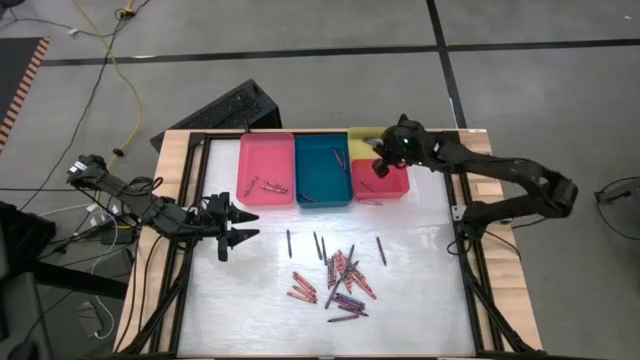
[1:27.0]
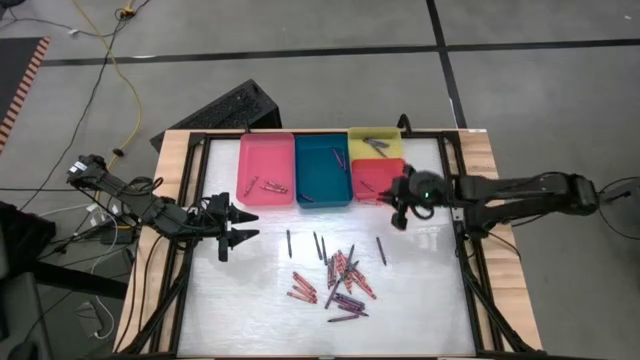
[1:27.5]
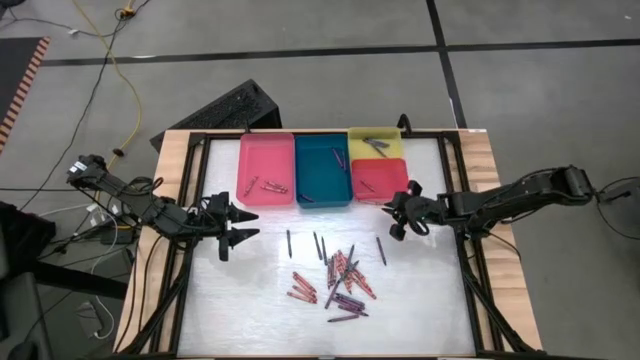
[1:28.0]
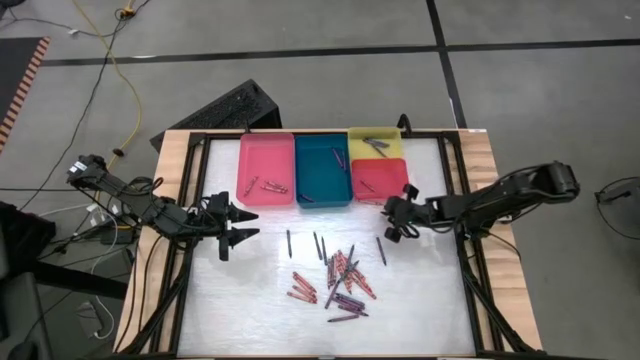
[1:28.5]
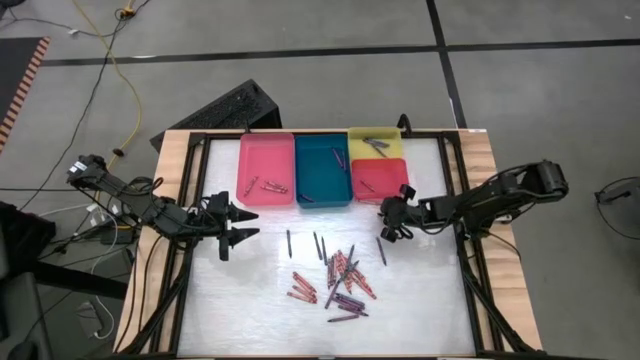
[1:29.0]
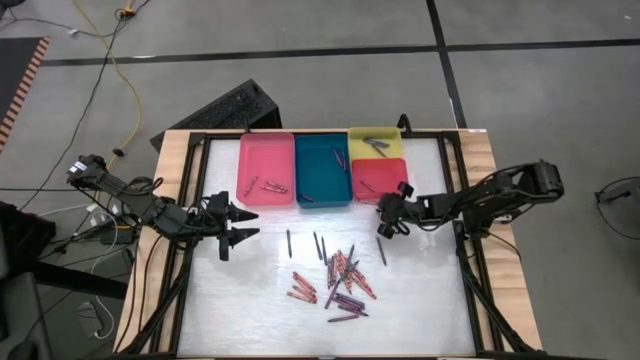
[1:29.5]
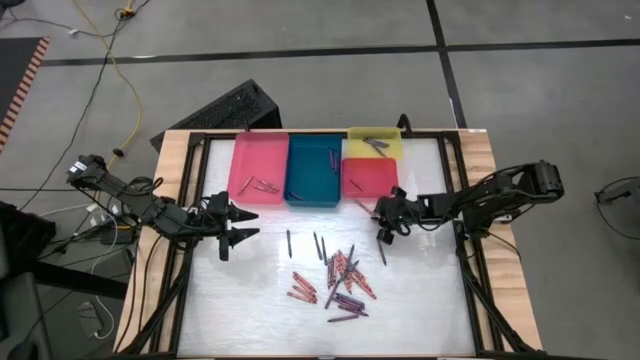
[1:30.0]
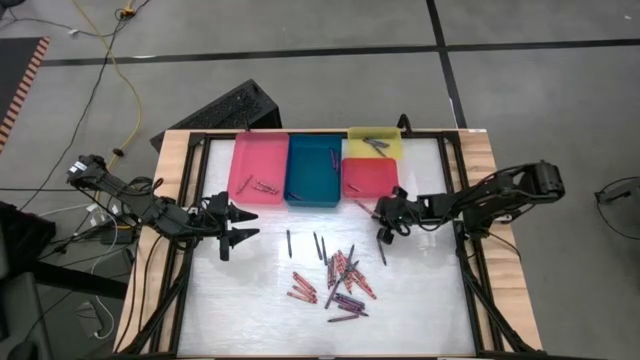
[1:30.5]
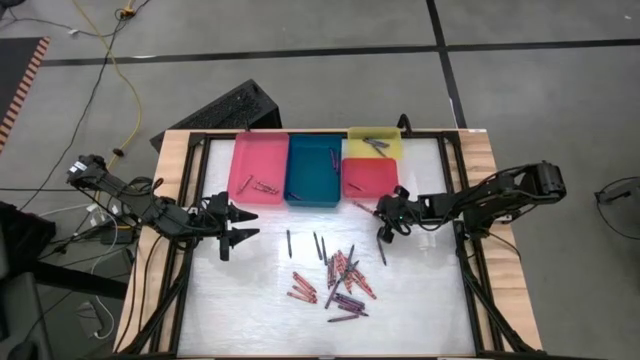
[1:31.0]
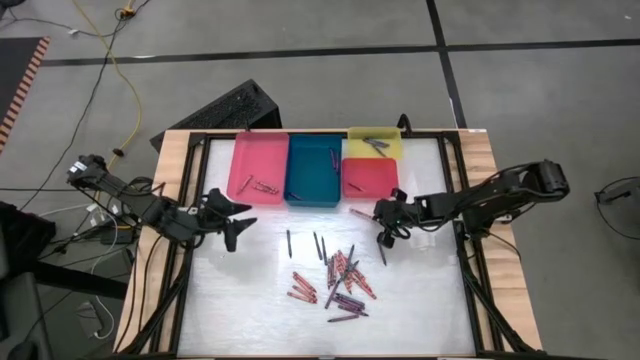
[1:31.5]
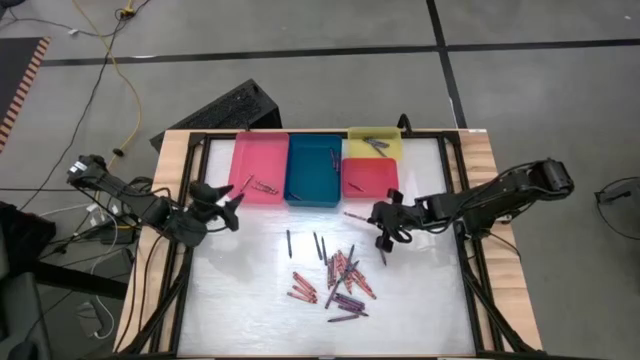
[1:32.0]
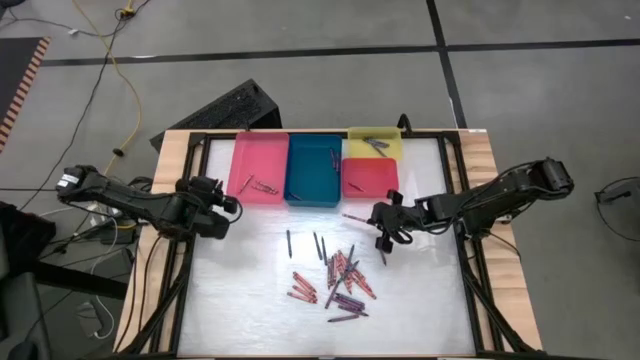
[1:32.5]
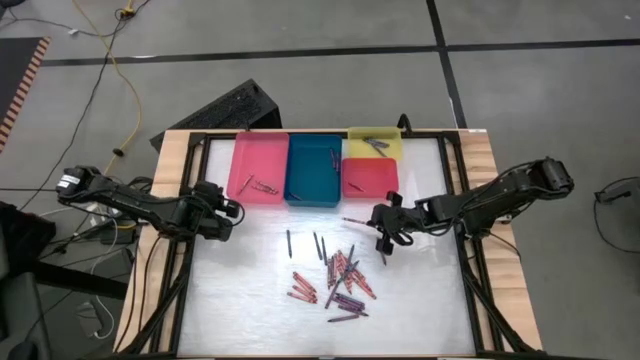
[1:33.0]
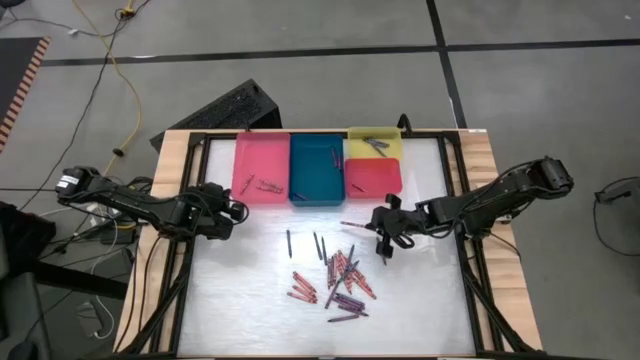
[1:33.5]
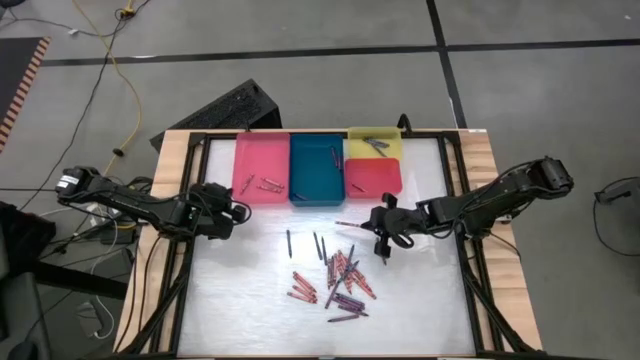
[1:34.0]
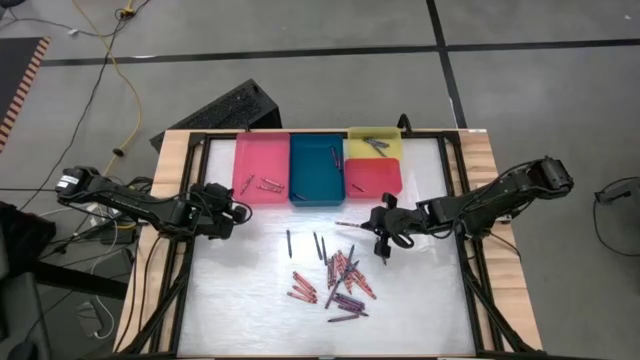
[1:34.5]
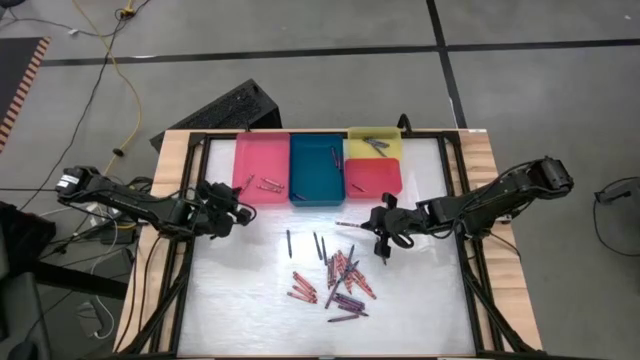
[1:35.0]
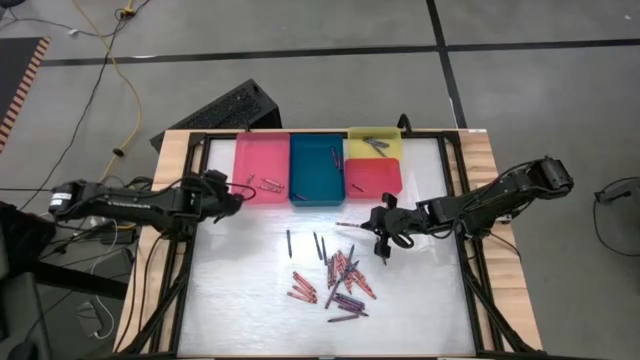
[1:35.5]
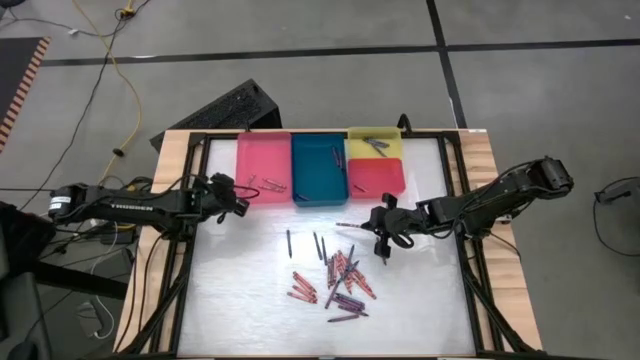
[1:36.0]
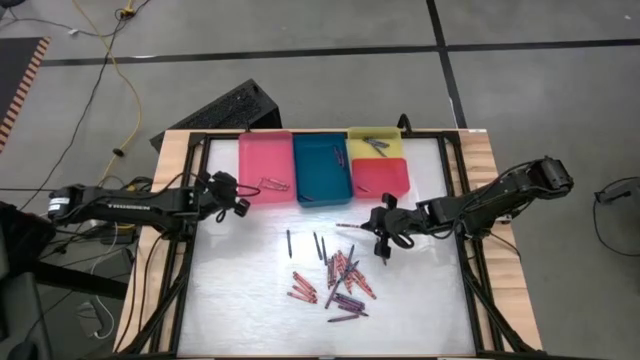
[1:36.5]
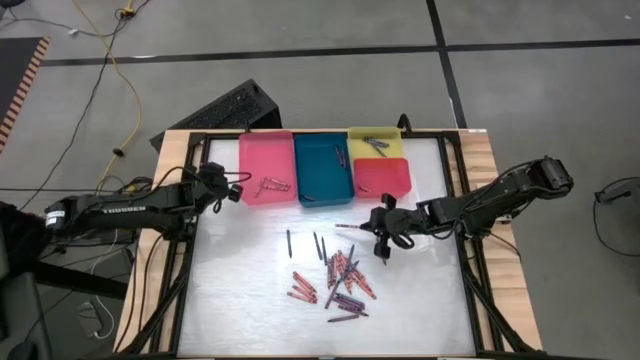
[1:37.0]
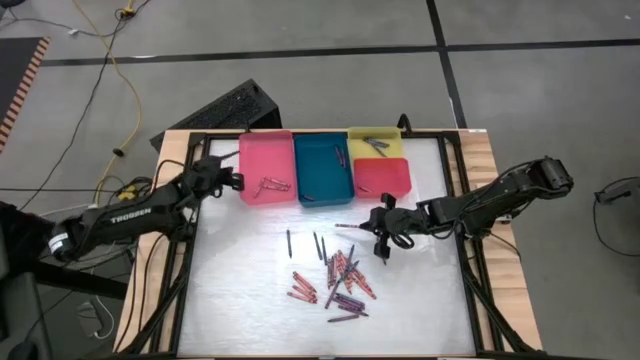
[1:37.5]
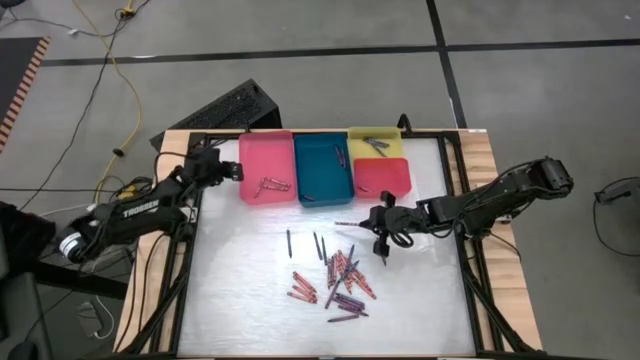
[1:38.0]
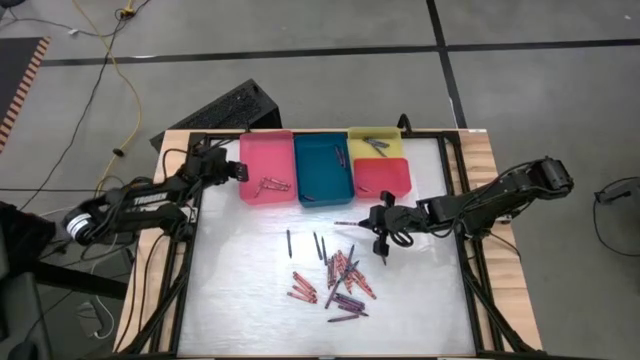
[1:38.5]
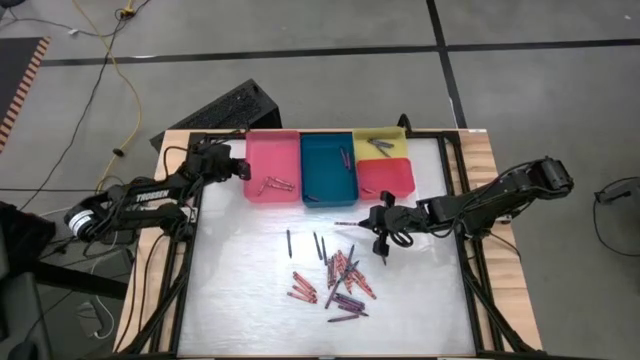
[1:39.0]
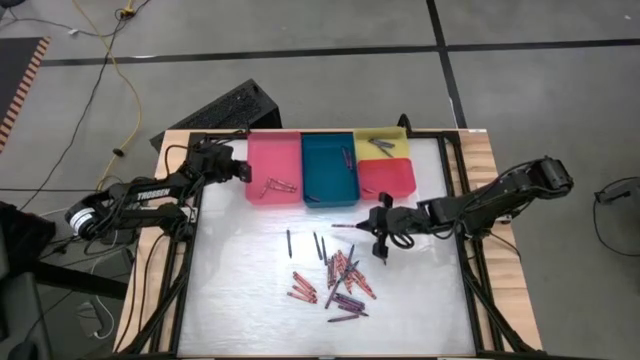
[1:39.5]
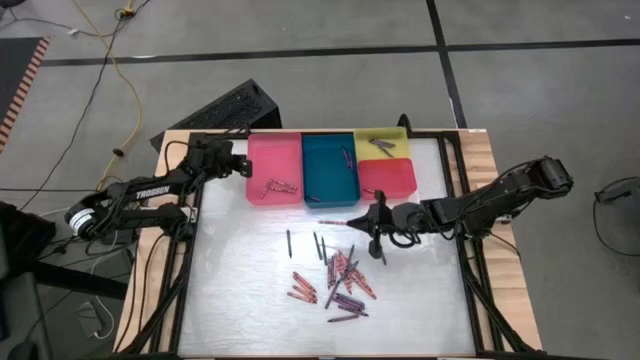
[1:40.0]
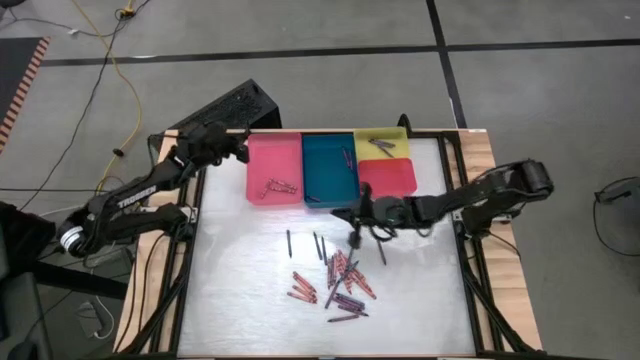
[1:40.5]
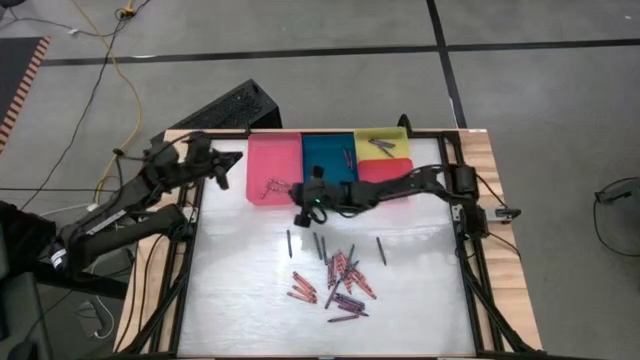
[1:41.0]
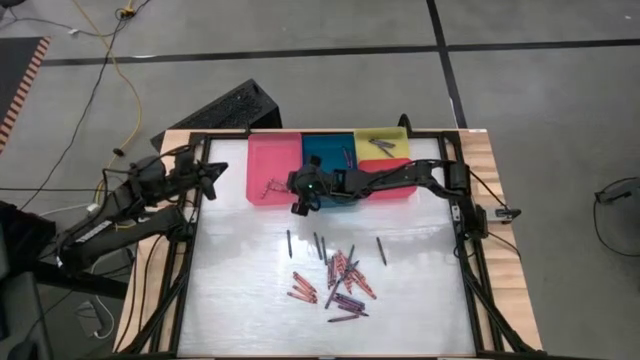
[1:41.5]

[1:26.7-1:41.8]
Task: Sort crayons
Put the pink crayon into the pink bin

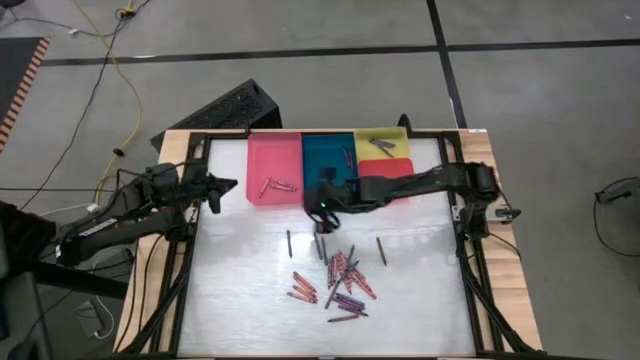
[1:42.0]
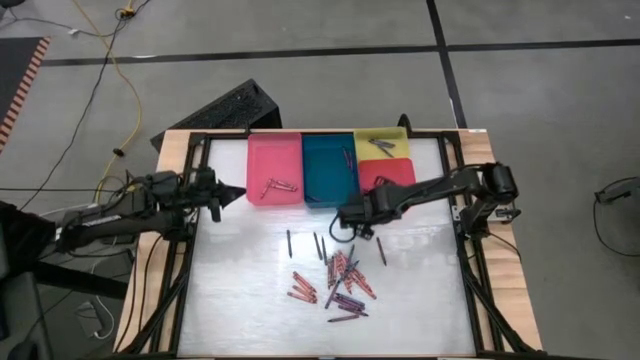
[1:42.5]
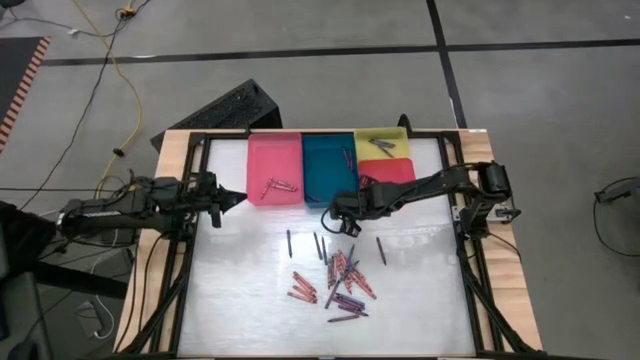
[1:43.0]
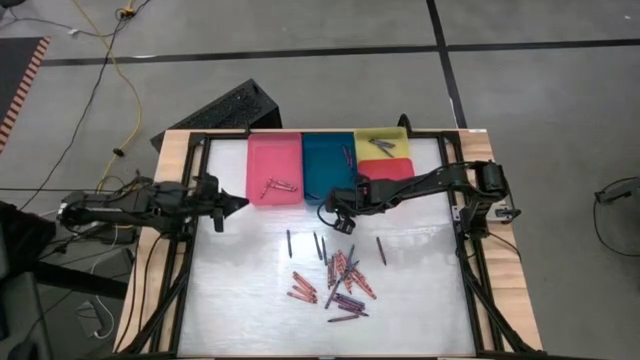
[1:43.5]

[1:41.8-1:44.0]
Adjust the blue bin

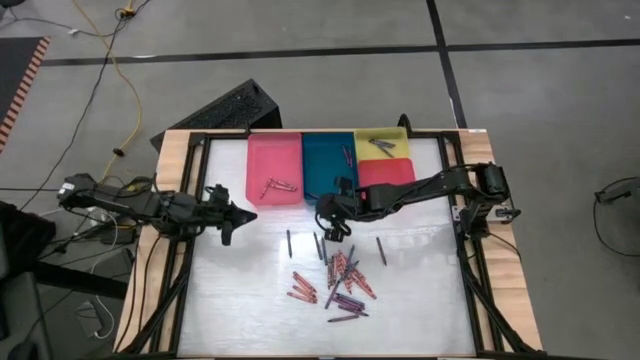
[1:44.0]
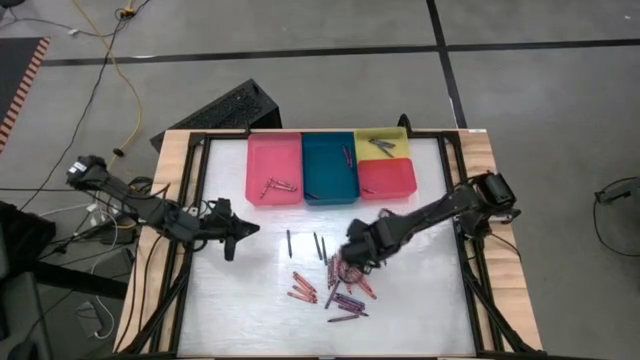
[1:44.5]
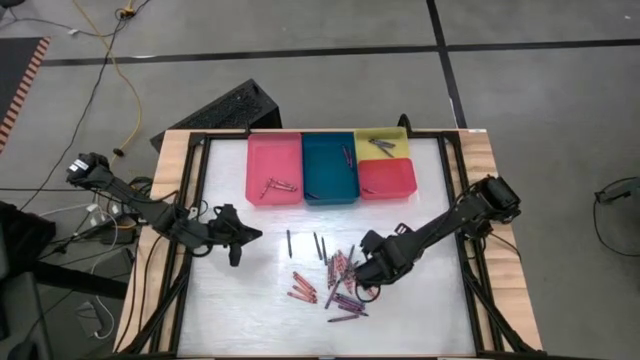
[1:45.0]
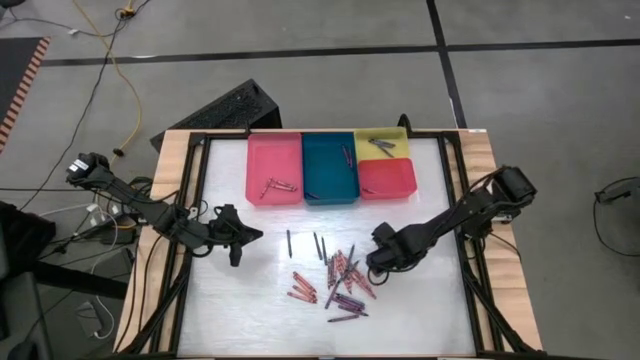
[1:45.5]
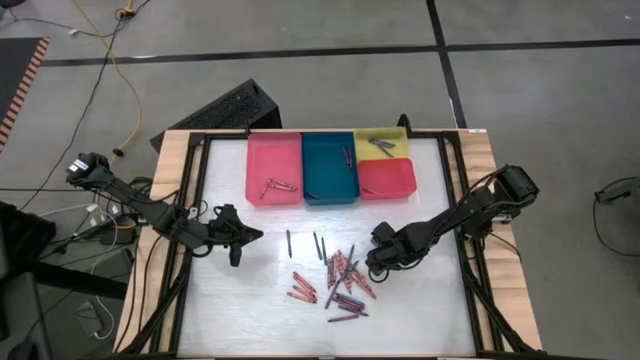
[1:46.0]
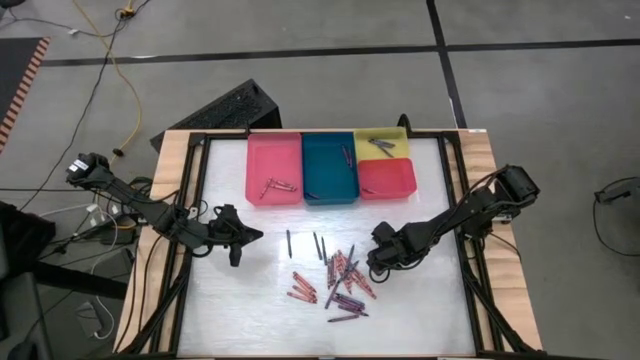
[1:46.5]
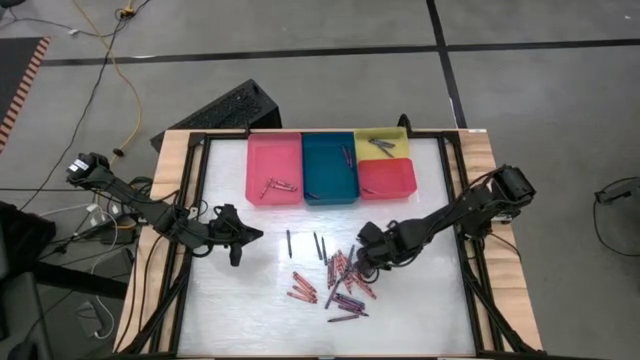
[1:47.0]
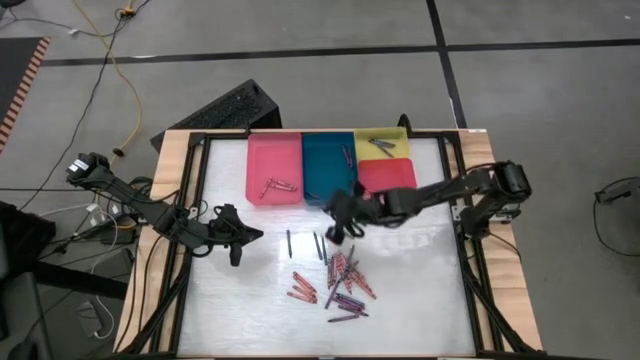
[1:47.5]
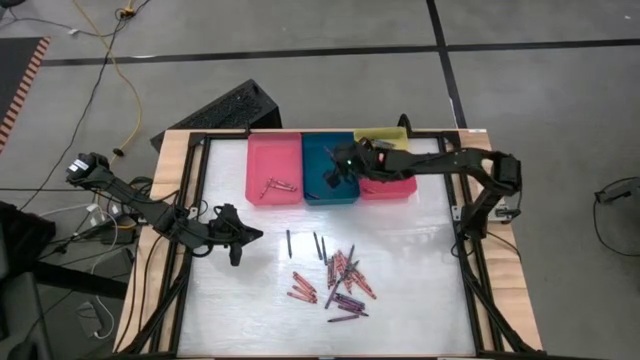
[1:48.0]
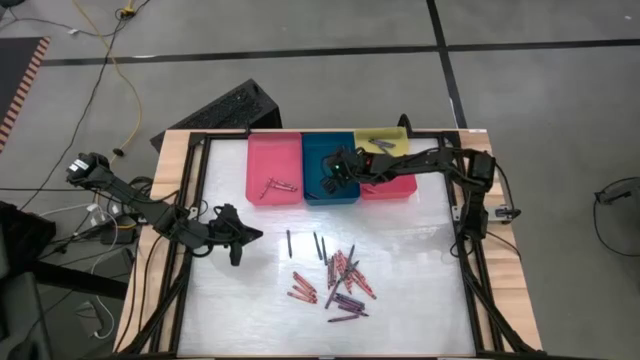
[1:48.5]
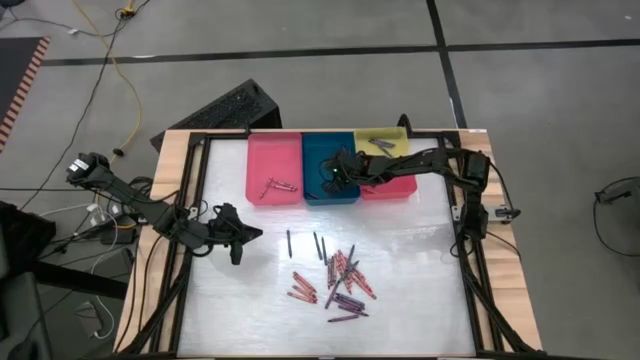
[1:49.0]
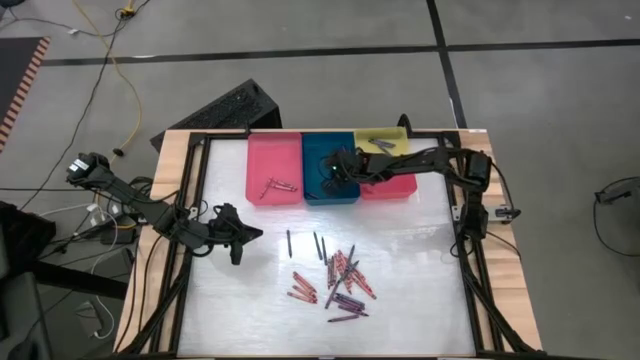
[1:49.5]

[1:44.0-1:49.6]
Put the violet crayon into the blue bin
